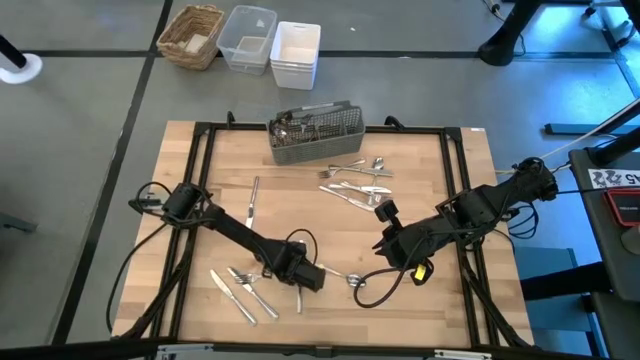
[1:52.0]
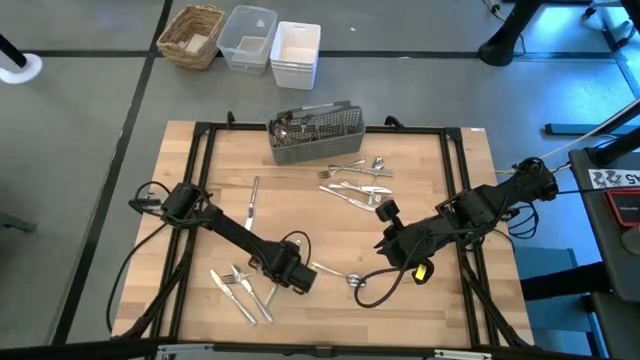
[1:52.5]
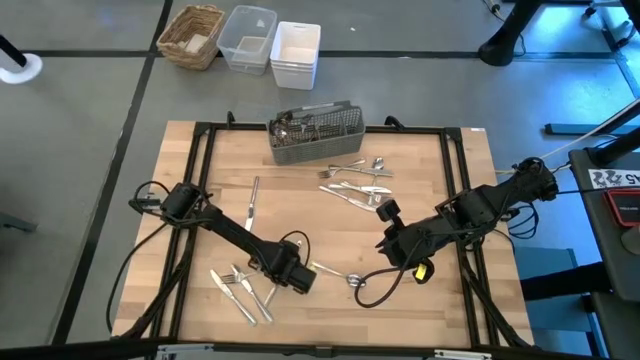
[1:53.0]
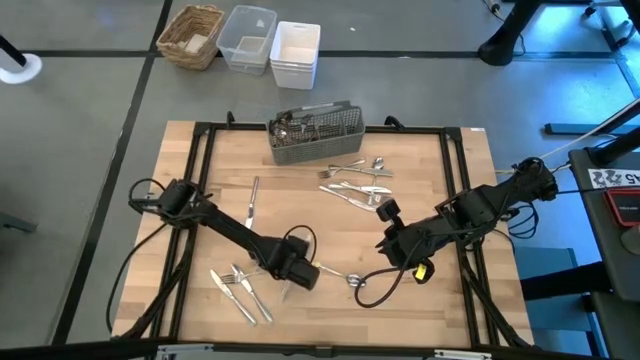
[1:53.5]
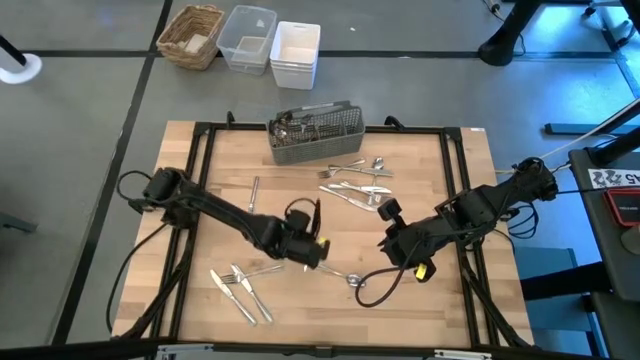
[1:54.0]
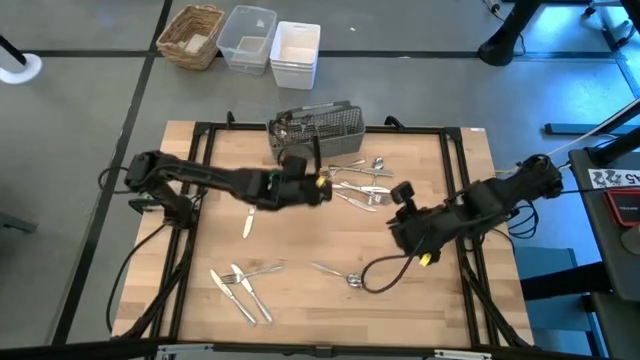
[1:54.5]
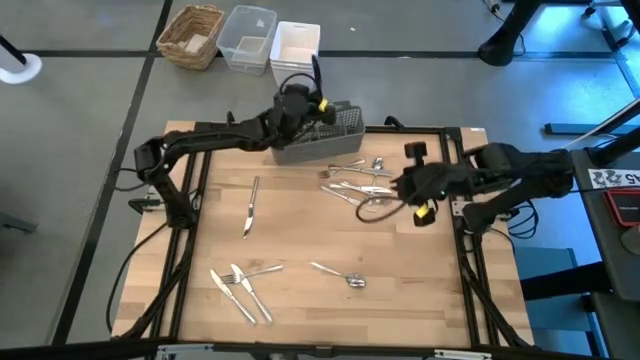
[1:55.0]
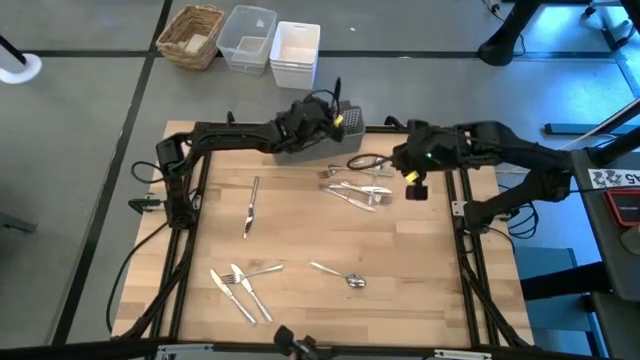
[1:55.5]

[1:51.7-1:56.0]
Task: Sort silverware
Put the silver knife into the silverware rack

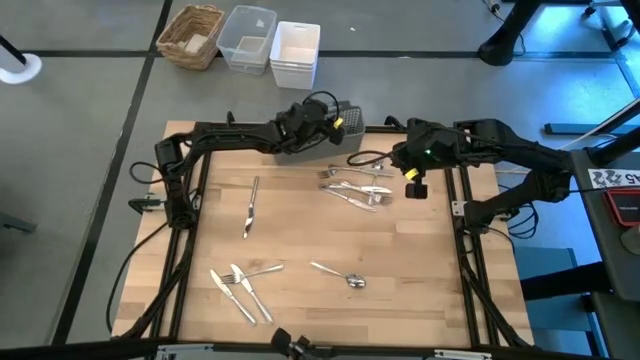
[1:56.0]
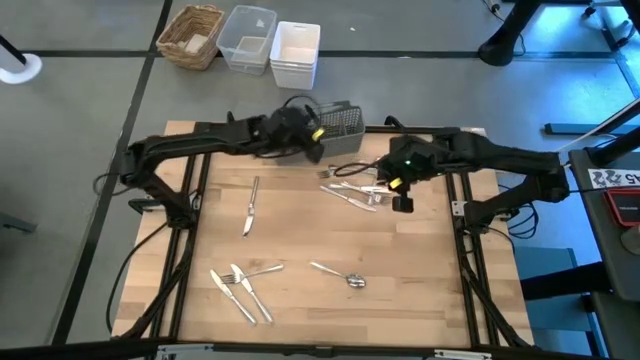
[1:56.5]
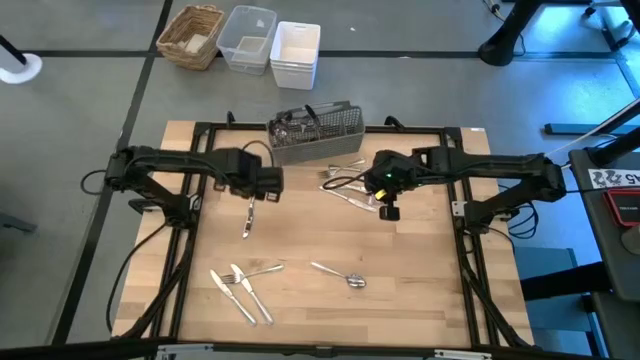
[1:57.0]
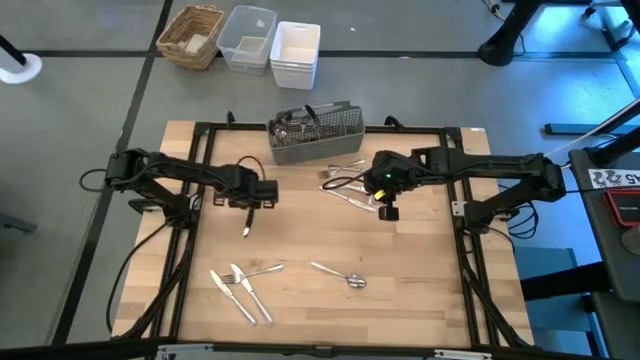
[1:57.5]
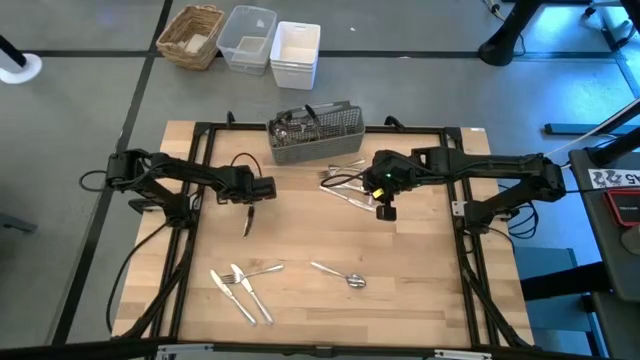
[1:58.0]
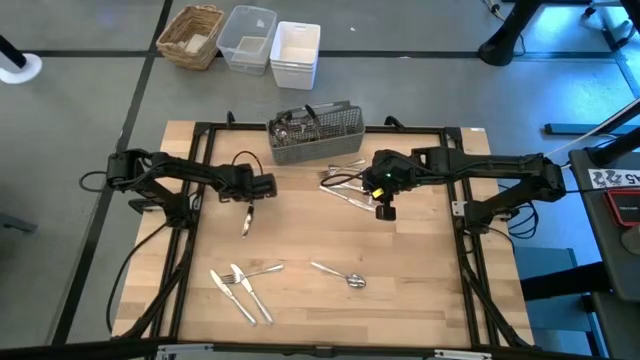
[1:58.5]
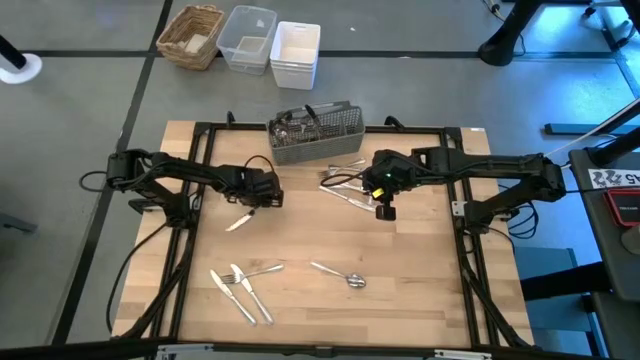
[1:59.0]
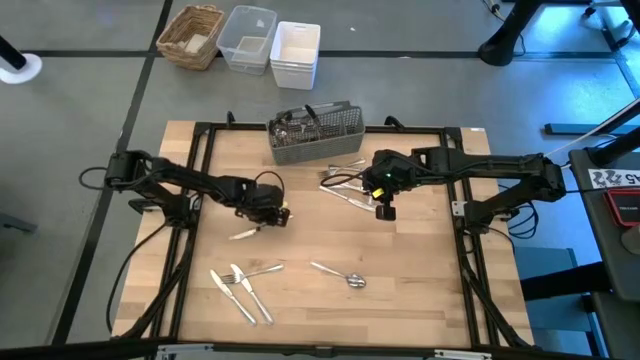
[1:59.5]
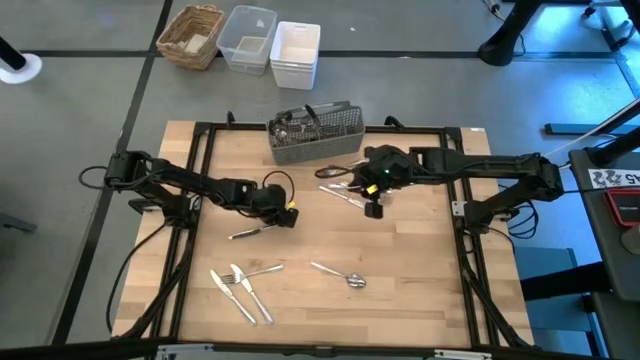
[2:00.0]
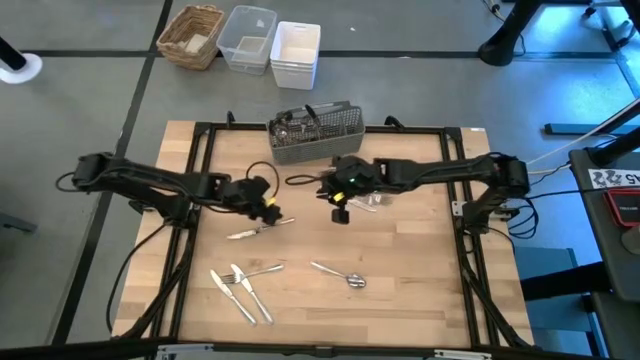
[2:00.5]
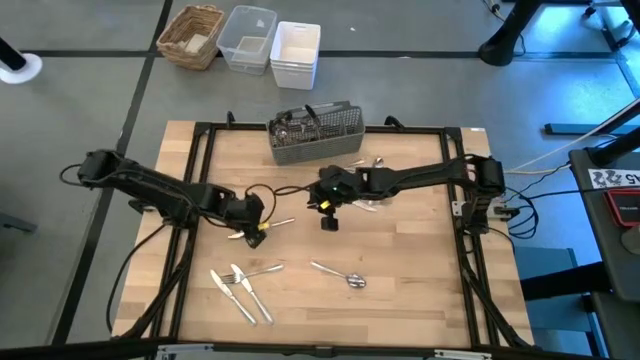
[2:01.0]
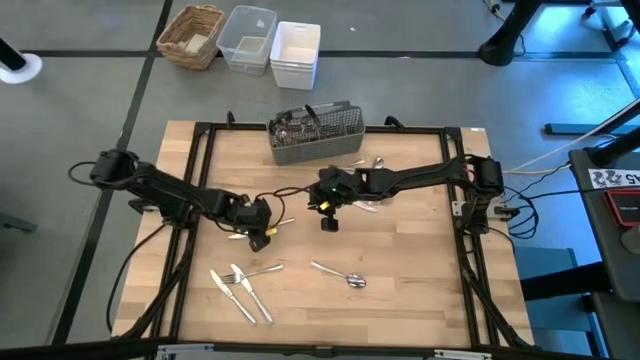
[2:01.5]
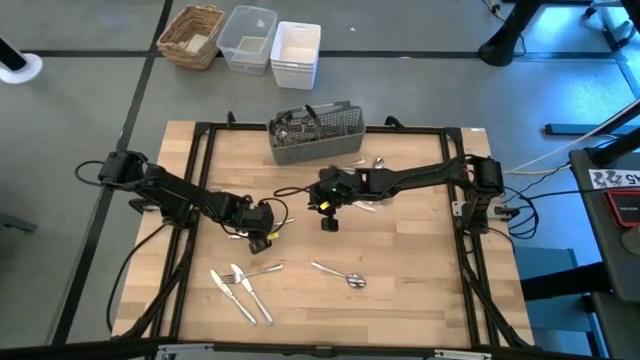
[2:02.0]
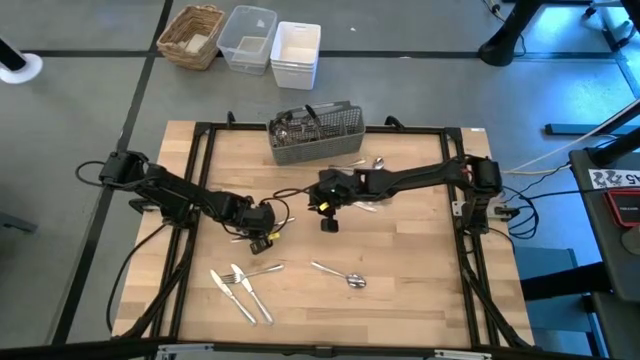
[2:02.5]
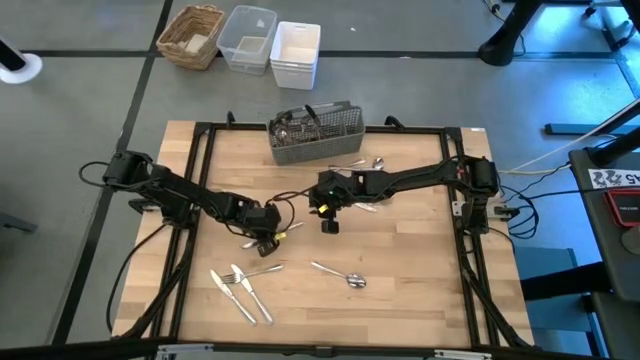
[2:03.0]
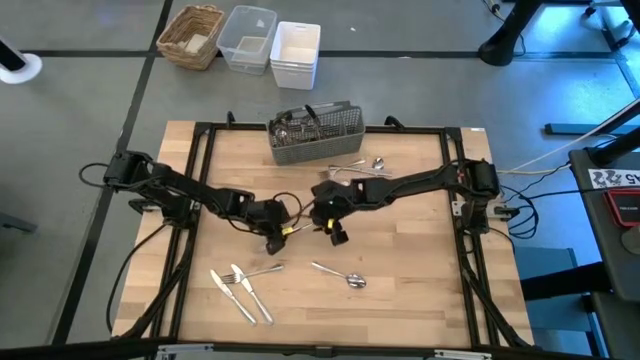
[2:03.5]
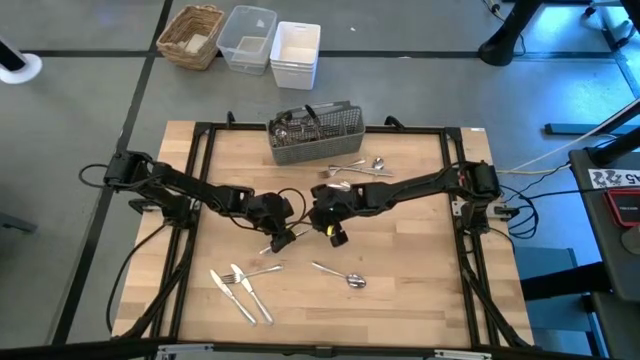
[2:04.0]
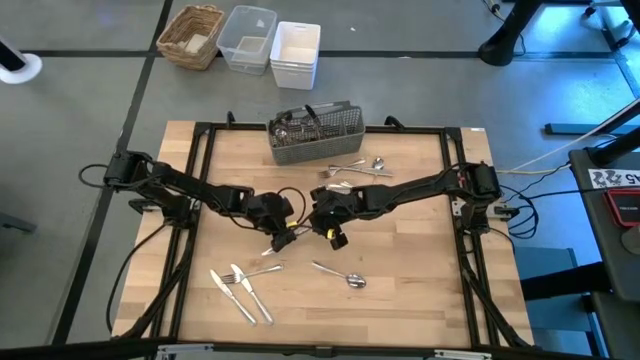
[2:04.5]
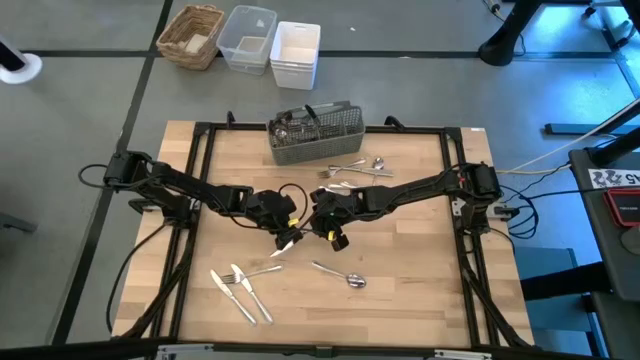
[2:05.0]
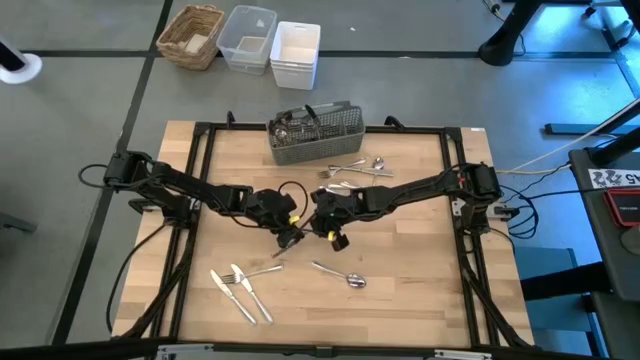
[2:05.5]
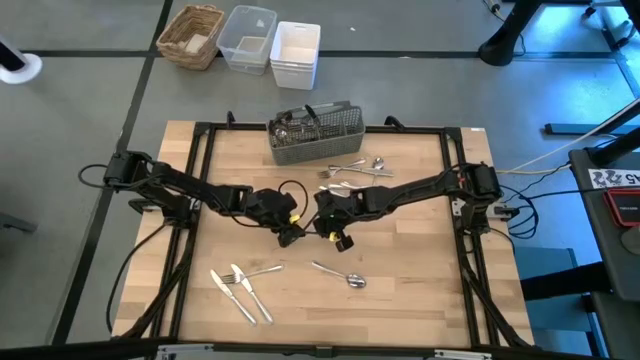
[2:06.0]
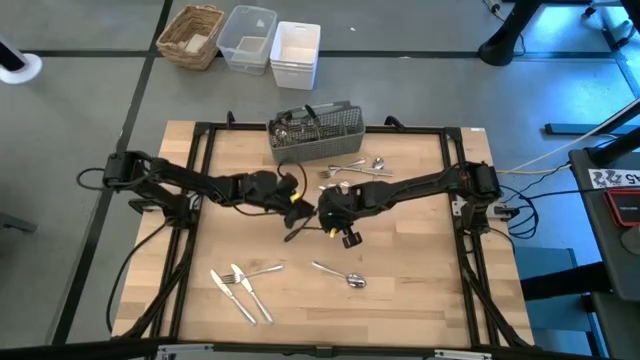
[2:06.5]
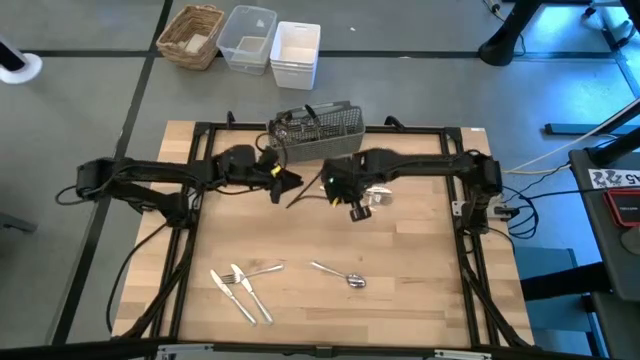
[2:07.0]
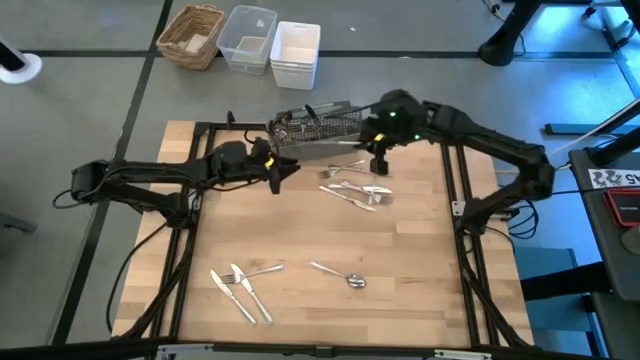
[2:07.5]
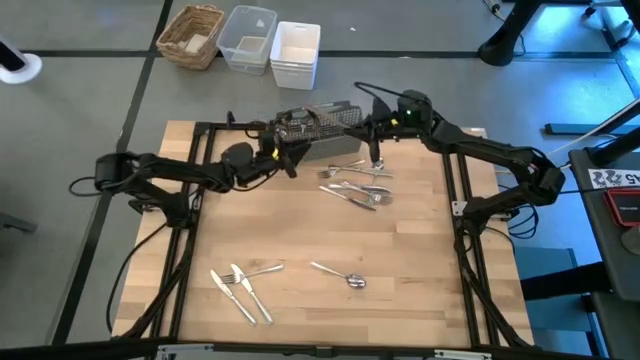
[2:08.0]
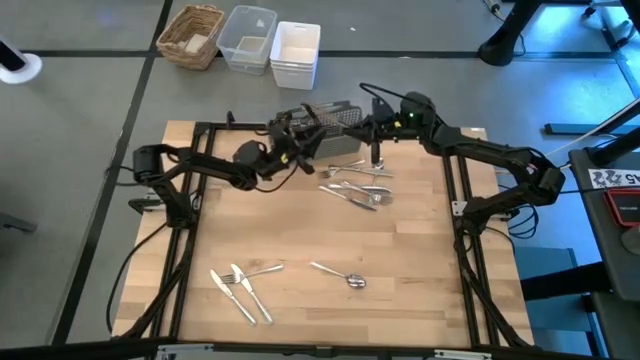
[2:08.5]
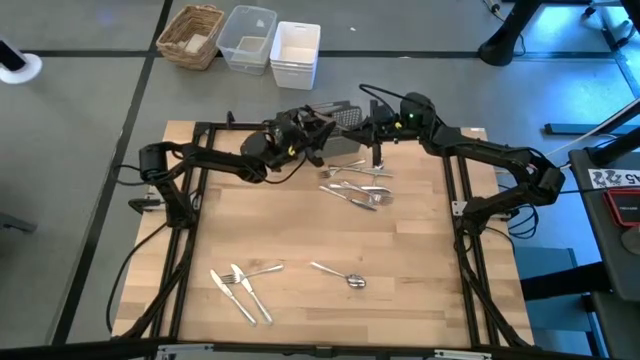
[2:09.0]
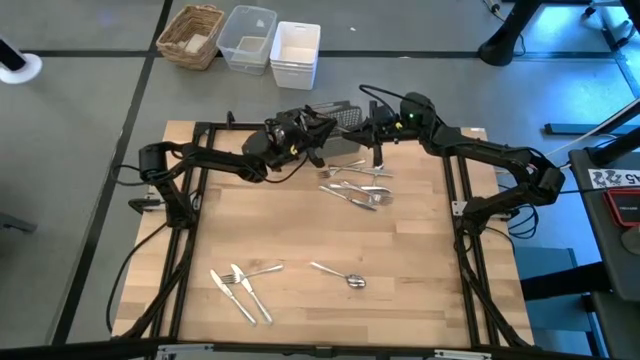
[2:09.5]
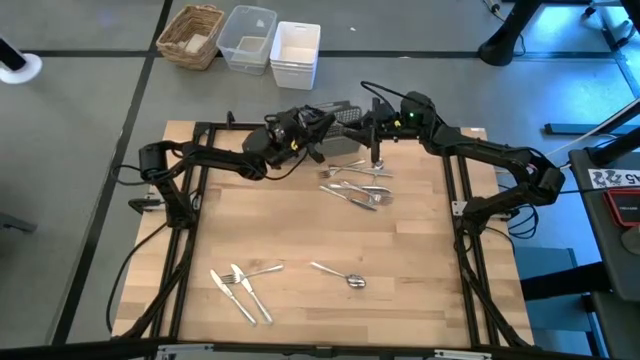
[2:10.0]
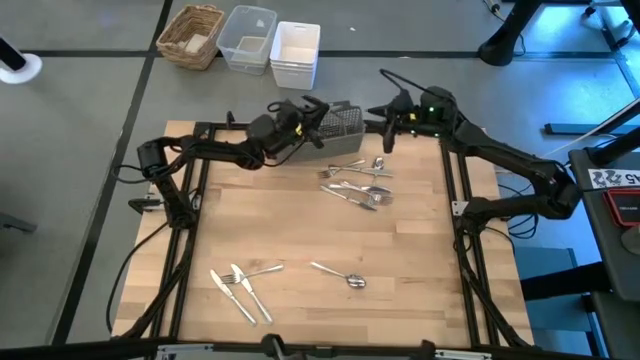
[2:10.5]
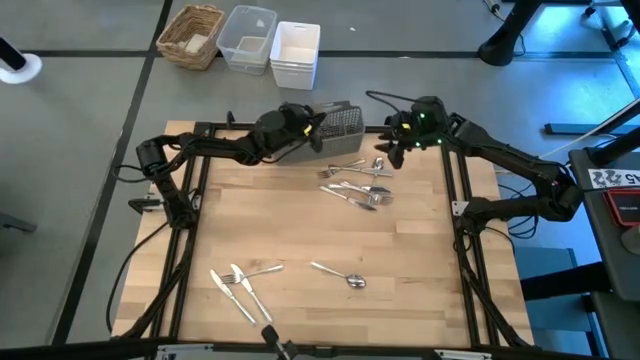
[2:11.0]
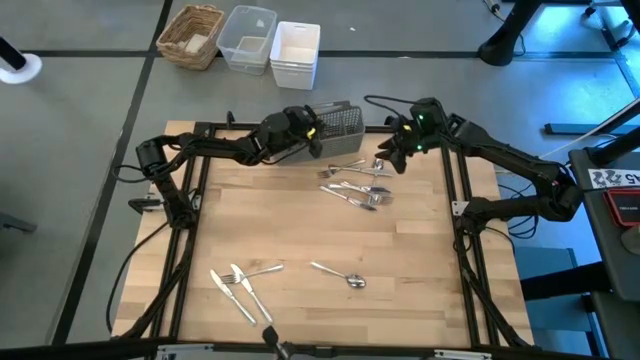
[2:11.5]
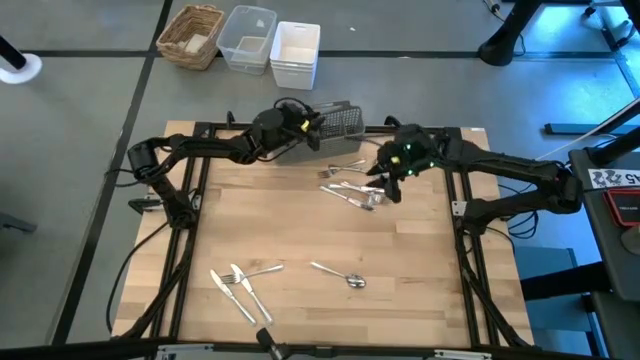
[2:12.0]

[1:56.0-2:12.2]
Put the silver knife into the silverware rack

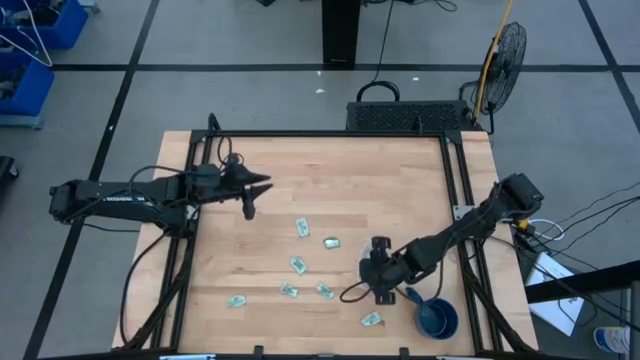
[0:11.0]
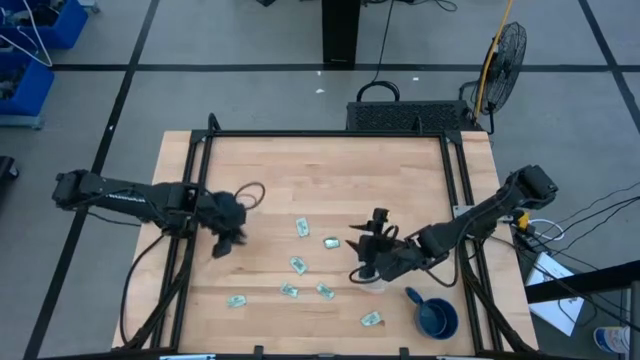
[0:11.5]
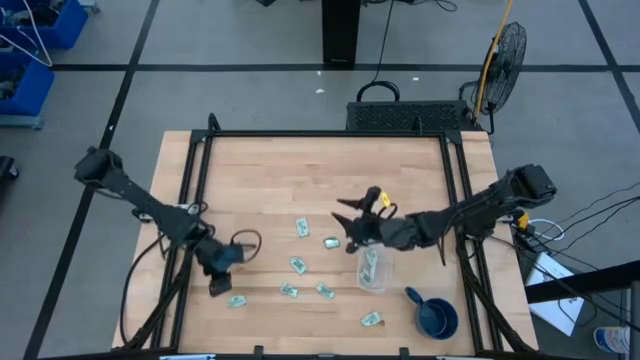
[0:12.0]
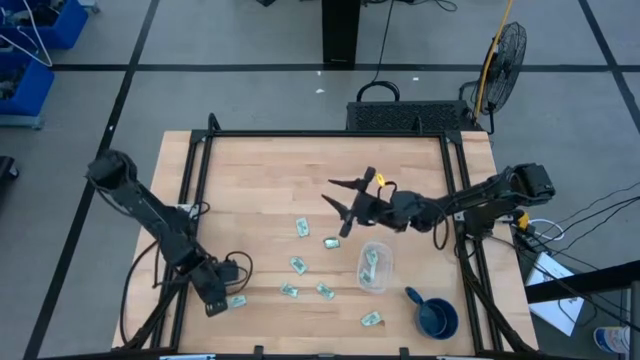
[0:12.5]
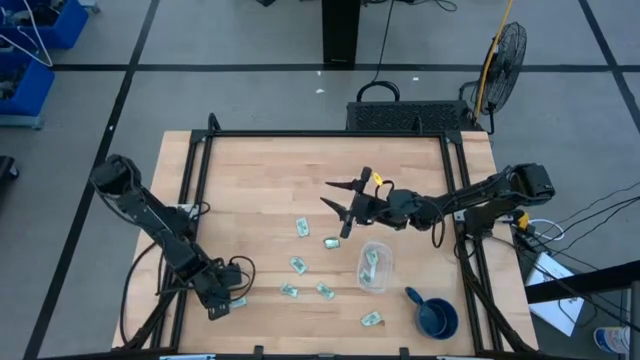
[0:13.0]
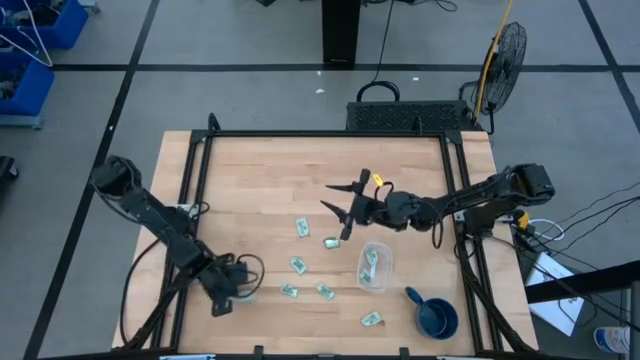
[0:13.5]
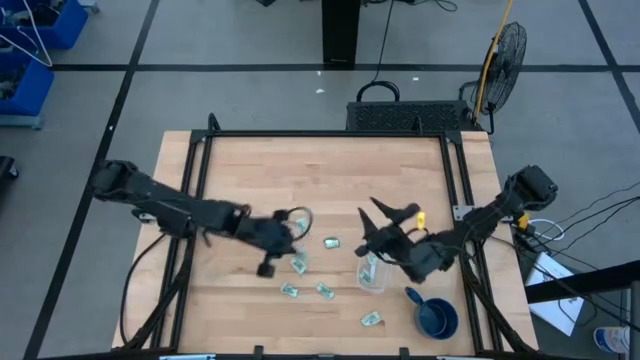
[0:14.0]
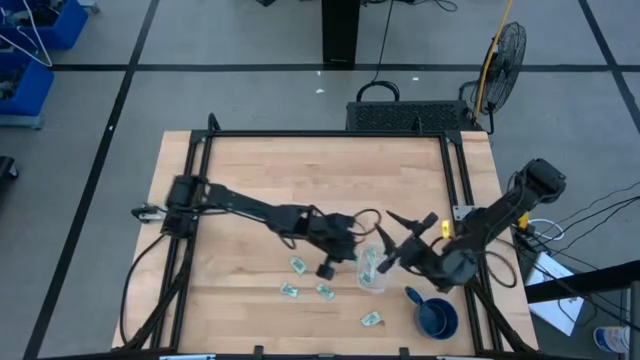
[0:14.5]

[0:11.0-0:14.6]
Task: Pick and place Stevia / Truvia into bins
Put the stevia packet into the transparent container
